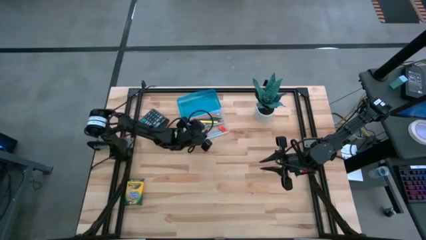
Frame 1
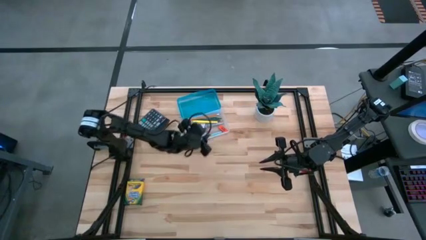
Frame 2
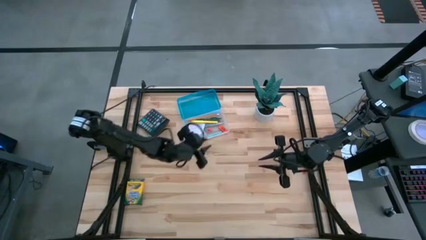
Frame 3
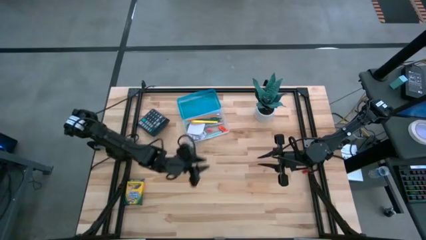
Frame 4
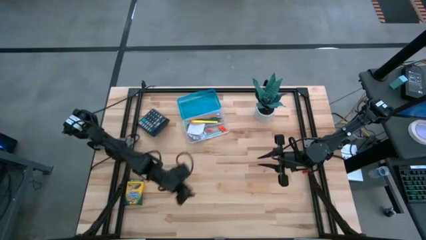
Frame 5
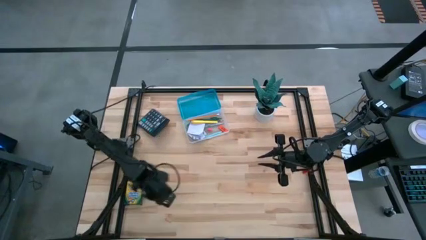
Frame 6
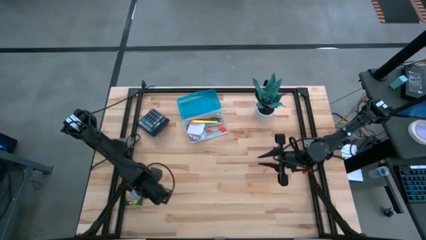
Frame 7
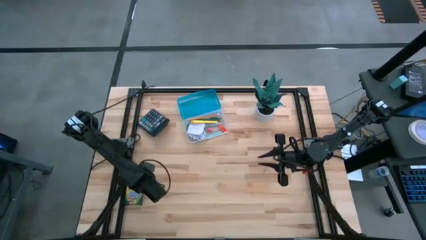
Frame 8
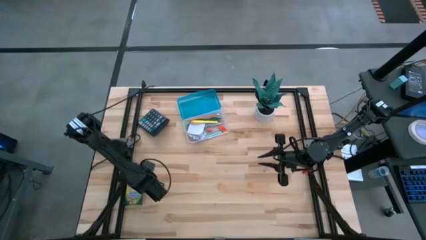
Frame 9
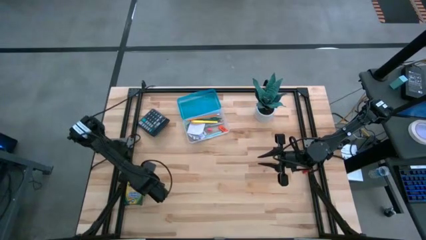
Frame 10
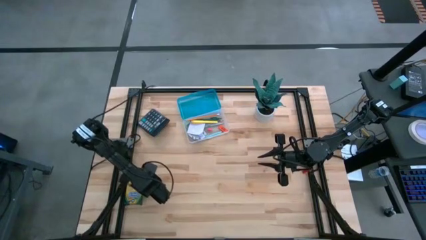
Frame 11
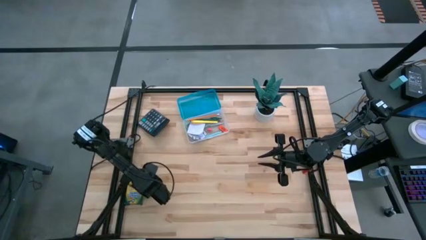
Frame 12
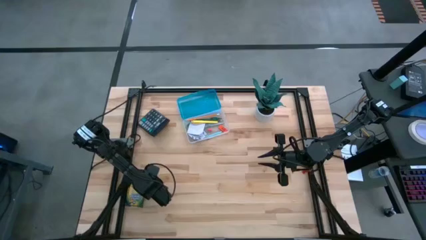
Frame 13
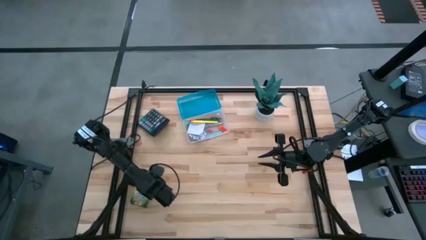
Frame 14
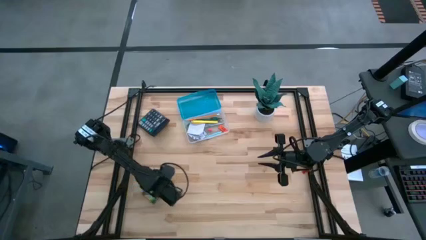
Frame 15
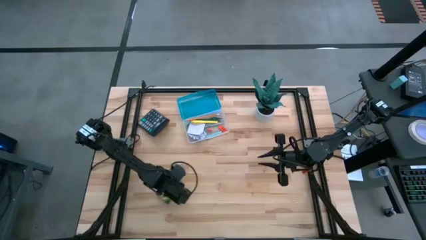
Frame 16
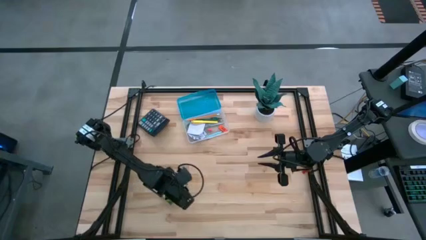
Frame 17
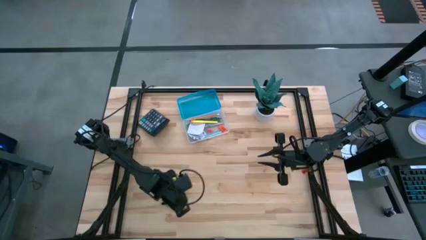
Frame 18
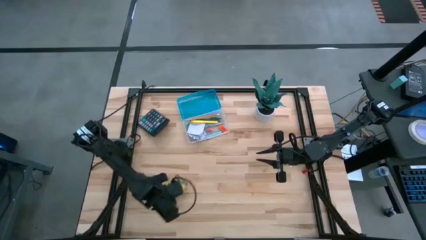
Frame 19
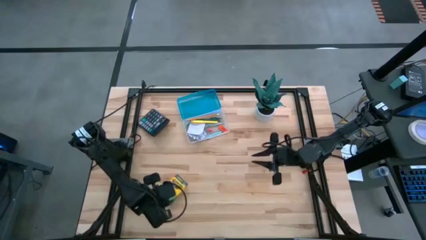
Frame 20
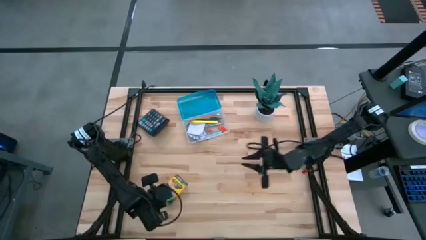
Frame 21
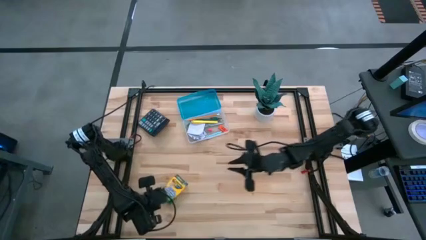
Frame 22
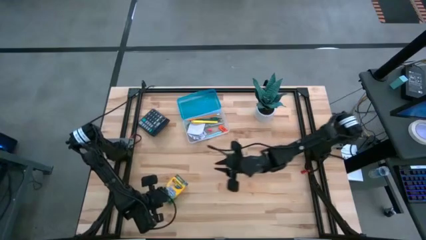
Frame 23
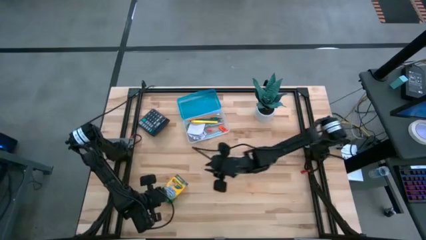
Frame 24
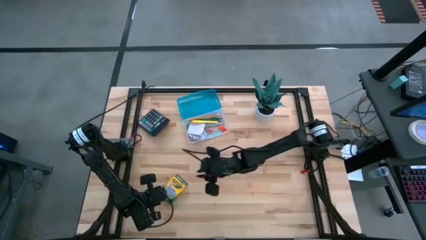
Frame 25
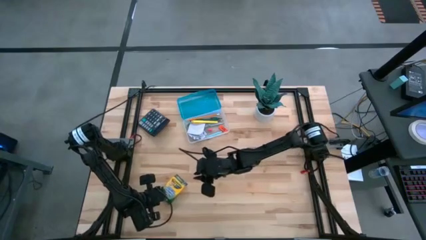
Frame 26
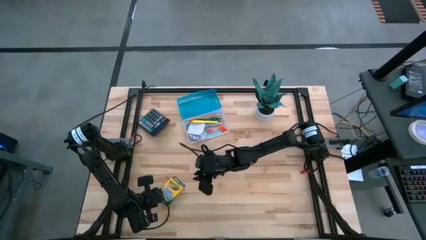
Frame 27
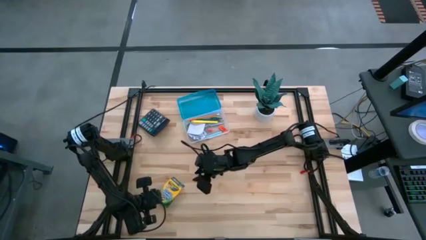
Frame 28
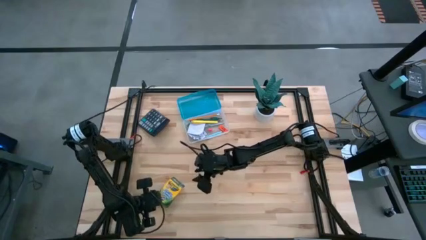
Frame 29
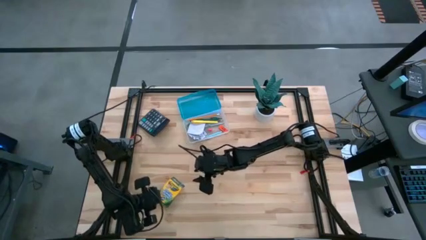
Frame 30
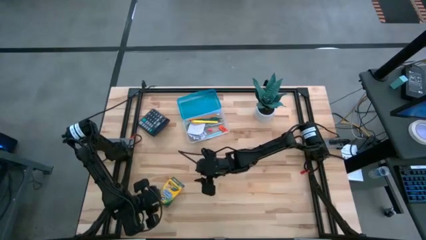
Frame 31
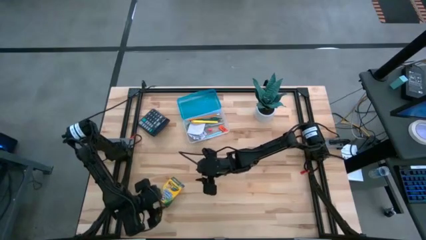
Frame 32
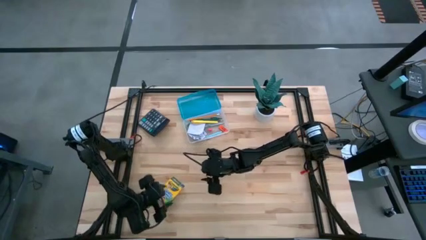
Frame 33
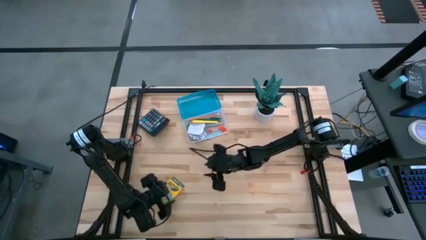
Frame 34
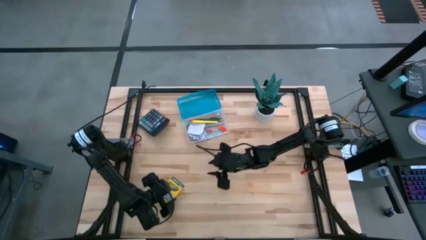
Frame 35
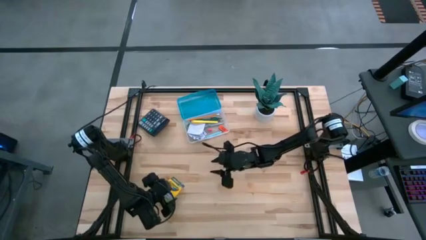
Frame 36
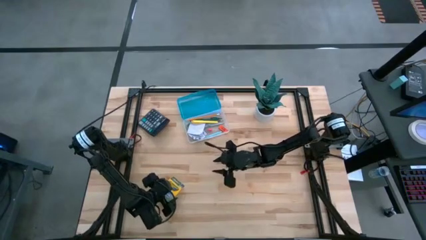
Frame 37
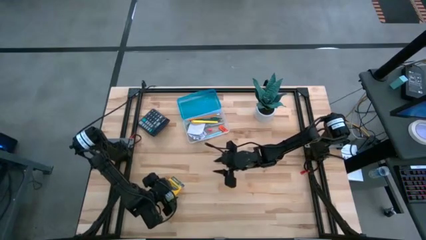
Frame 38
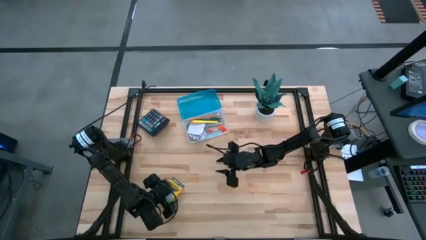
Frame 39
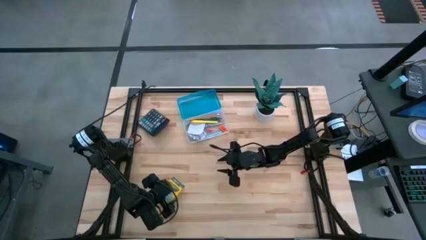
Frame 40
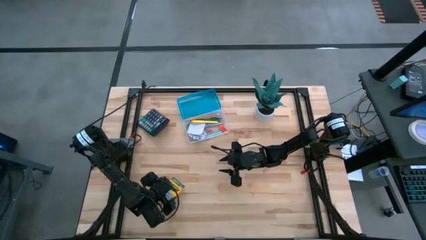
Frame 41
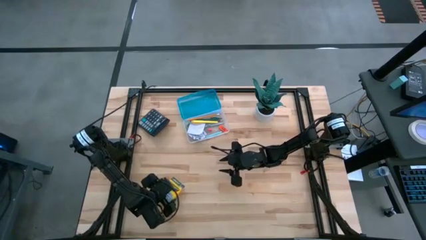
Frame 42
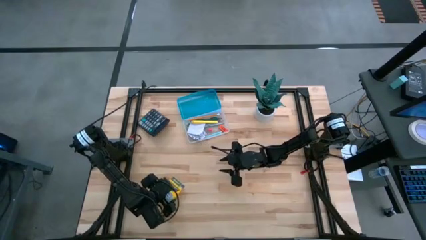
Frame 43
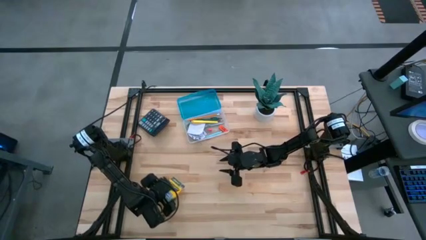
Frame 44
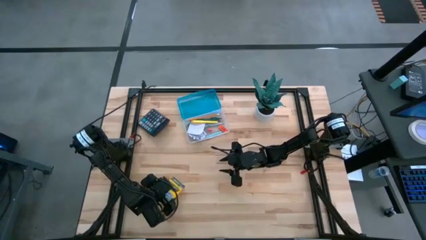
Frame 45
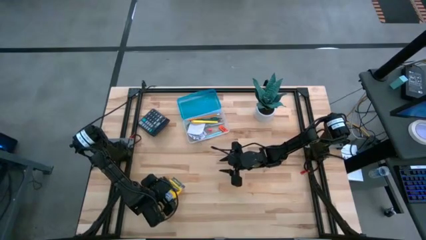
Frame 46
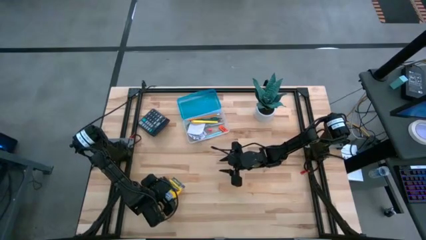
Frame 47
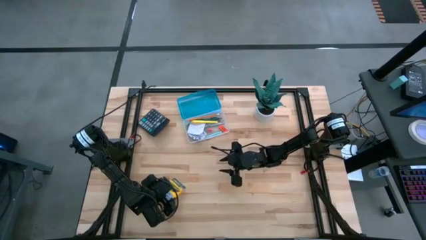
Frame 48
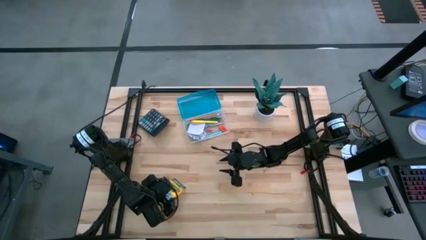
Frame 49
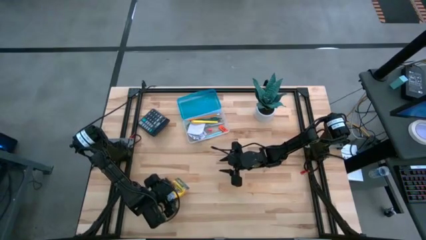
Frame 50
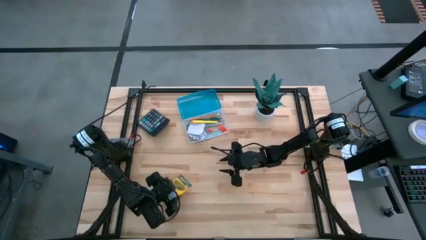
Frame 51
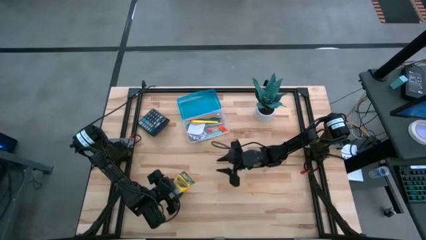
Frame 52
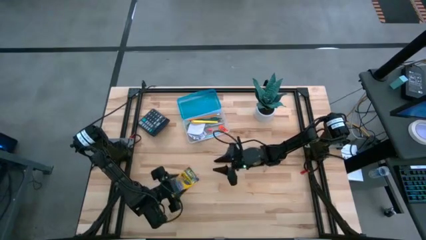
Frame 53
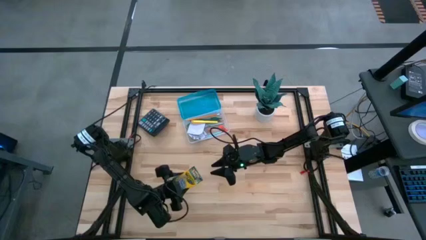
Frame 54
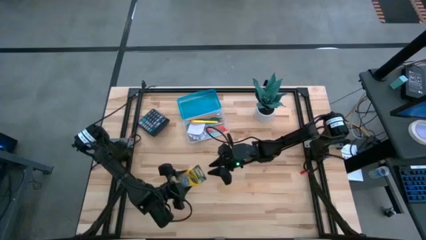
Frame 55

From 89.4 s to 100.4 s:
Task: Pack school essentials
Put the yellow crayon box into the blue supply box

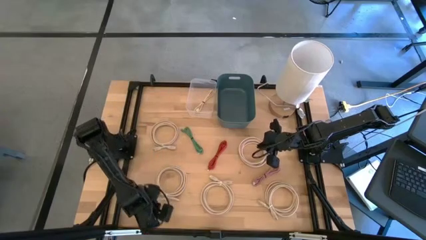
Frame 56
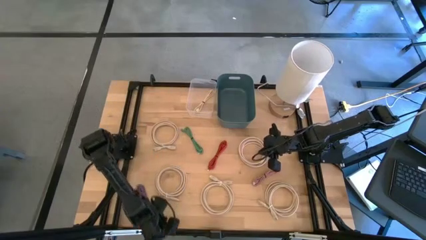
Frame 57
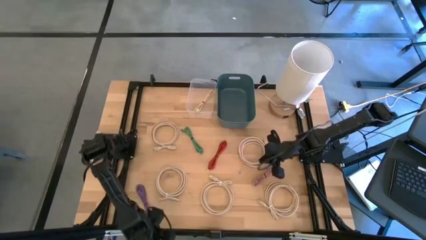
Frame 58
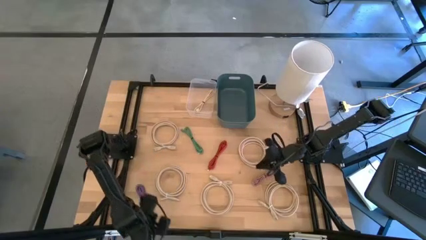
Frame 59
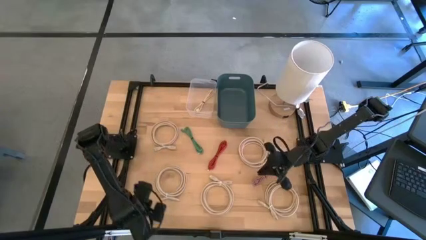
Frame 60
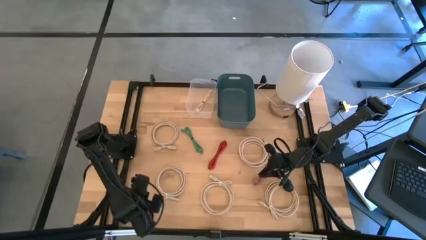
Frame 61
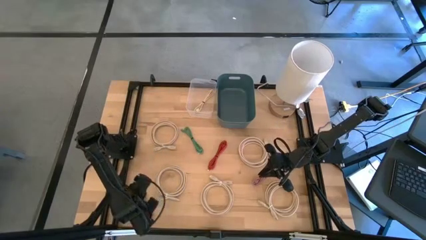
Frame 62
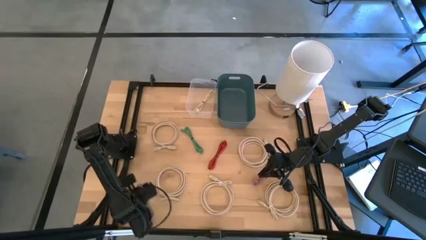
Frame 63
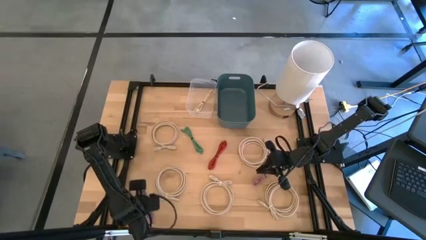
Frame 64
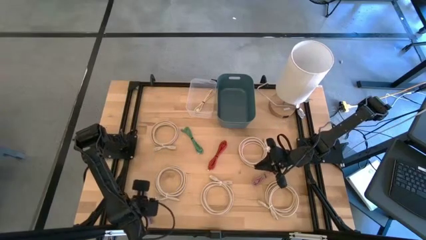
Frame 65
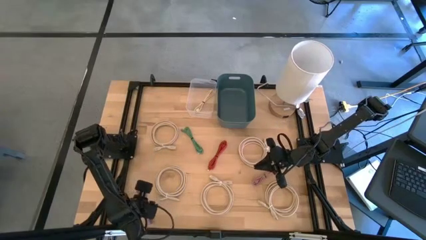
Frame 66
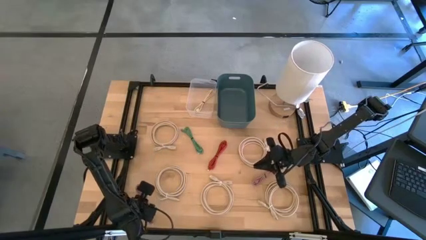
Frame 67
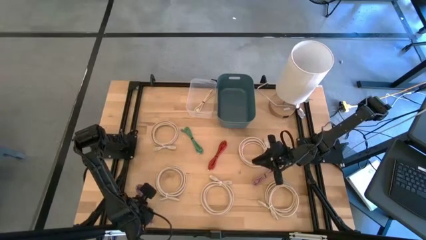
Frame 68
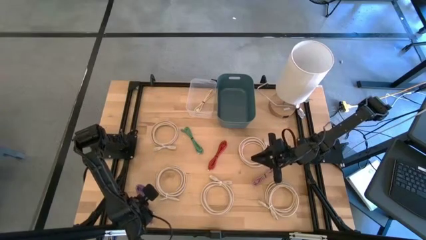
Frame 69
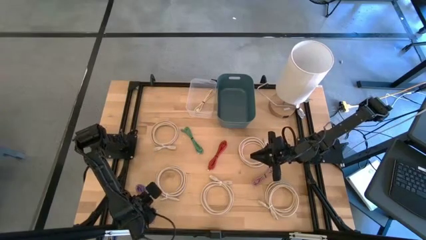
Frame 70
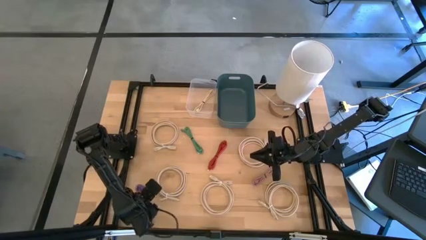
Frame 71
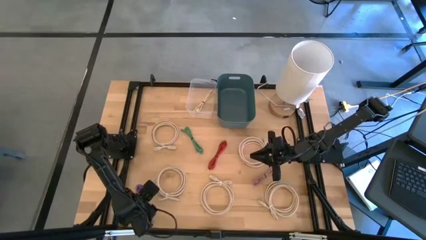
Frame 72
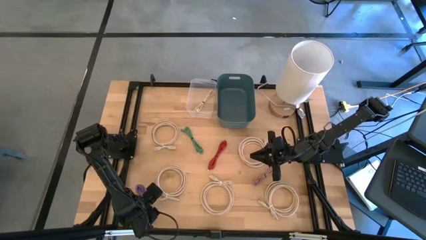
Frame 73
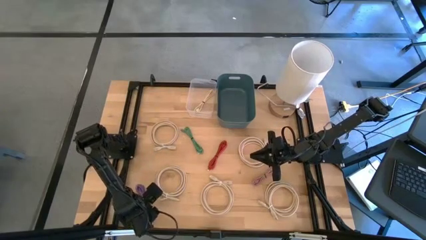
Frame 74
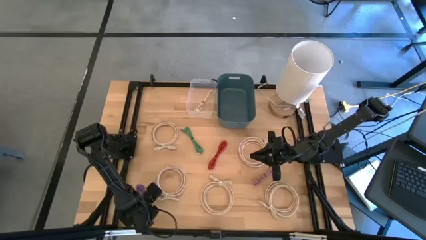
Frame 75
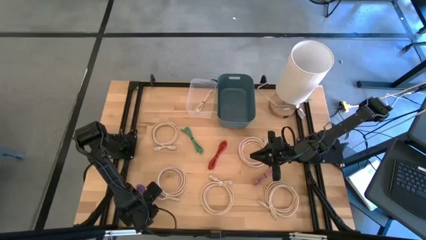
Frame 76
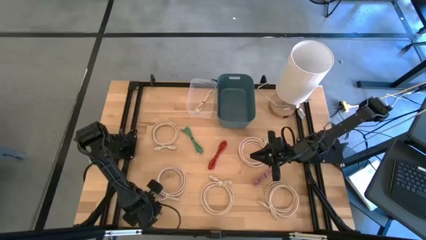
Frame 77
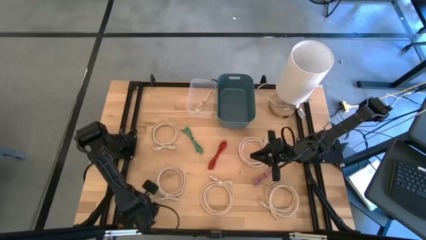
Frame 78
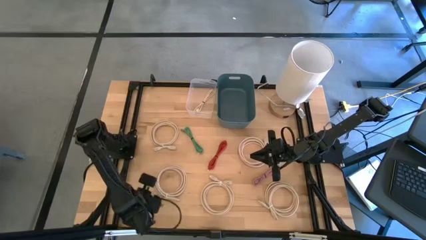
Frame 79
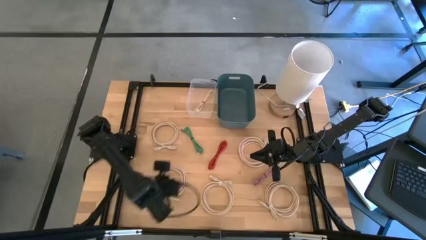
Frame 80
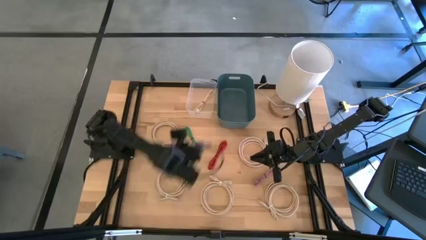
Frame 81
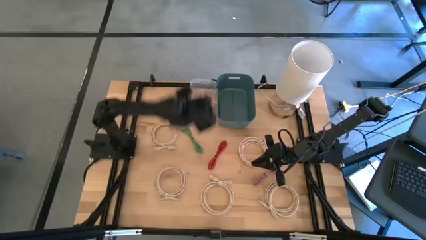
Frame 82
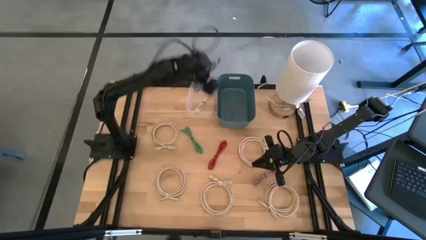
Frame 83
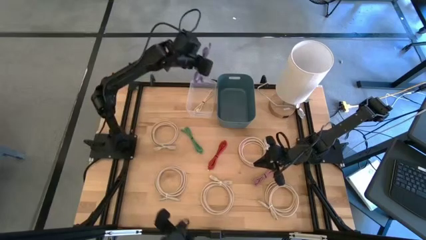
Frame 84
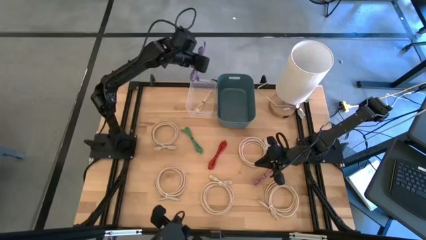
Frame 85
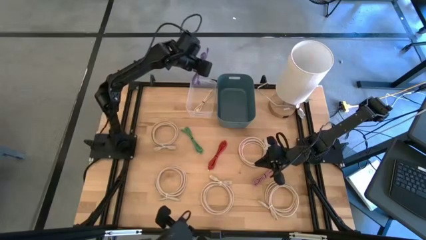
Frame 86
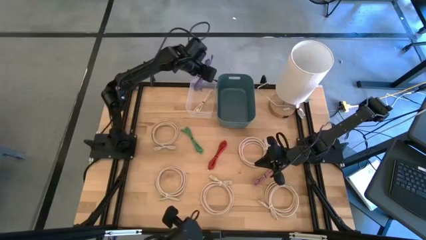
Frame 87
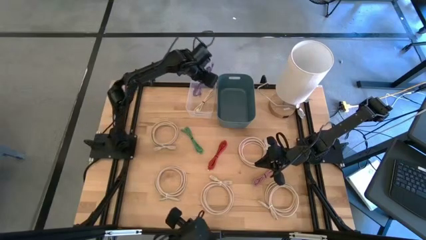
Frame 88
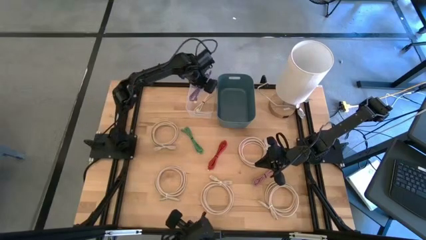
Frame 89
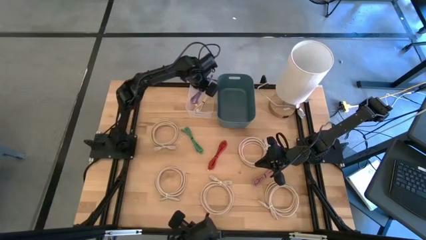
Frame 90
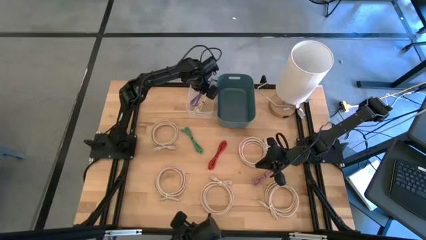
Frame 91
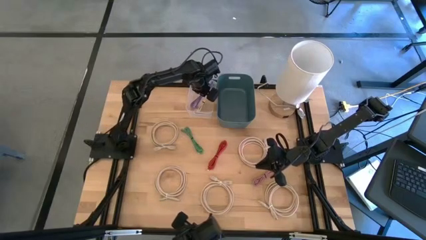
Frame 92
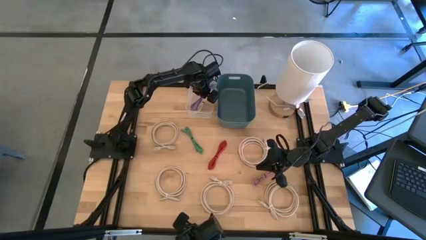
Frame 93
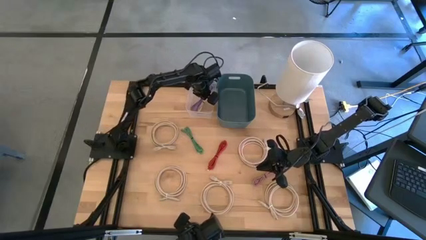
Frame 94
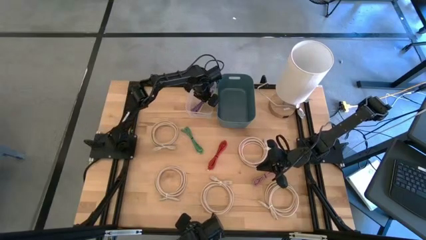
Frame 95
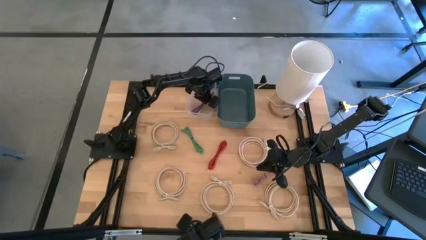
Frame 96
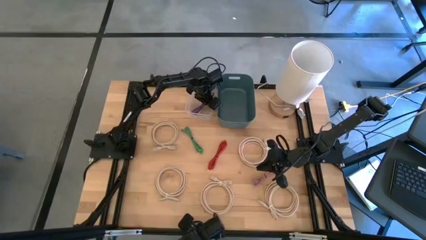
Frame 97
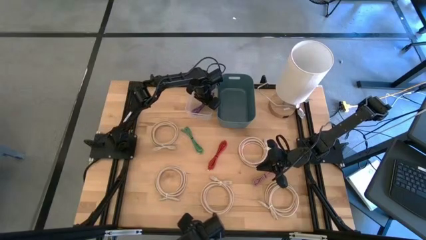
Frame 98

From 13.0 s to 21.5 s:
Task: Pick and place USB-C Cables
Put the purple USB cable into the transparent bin
